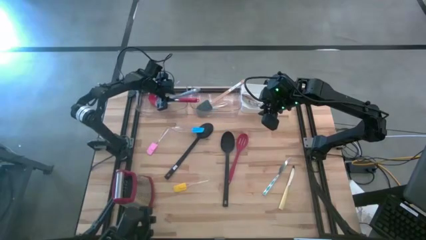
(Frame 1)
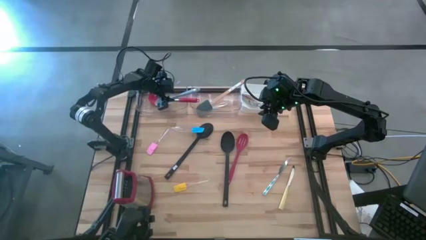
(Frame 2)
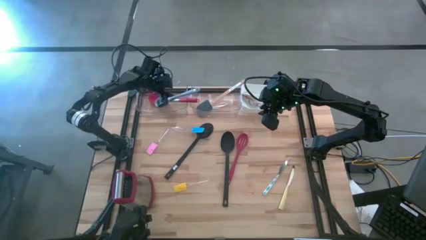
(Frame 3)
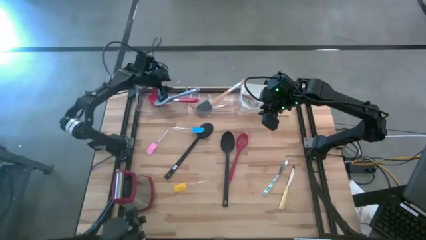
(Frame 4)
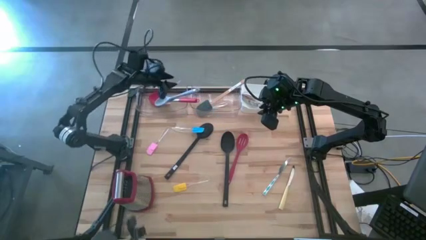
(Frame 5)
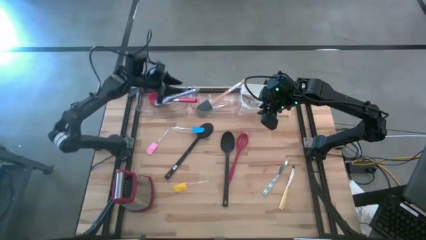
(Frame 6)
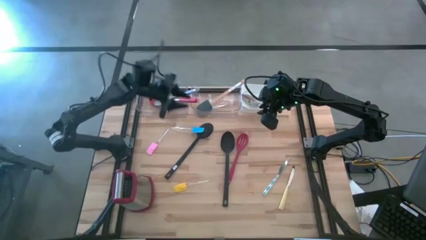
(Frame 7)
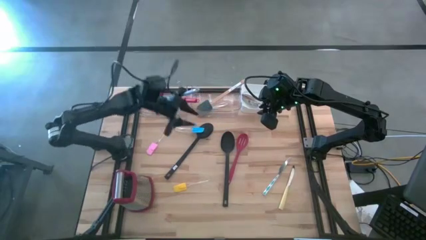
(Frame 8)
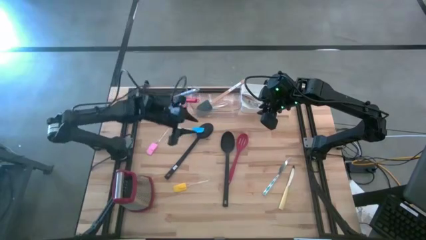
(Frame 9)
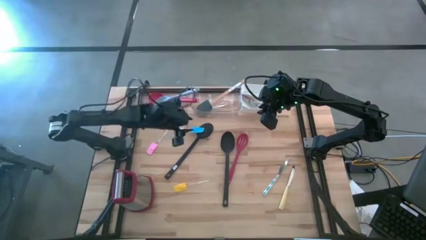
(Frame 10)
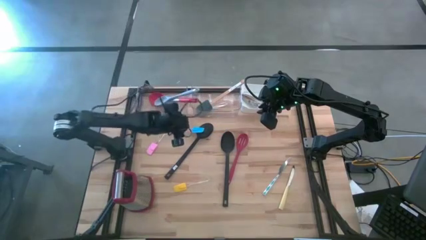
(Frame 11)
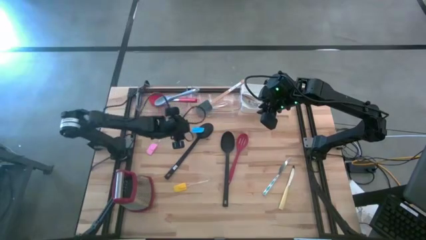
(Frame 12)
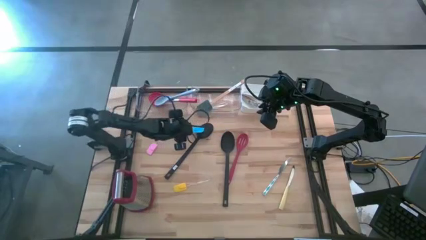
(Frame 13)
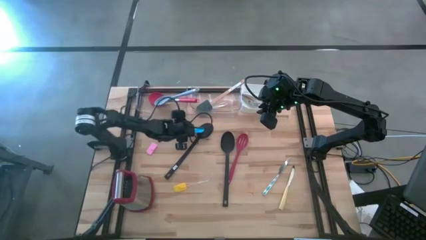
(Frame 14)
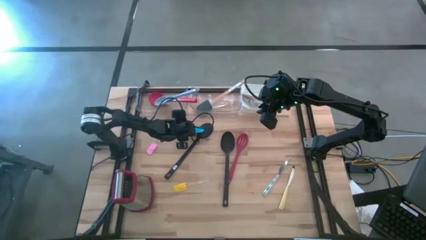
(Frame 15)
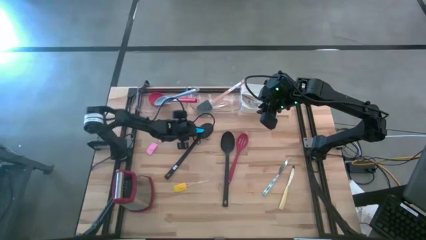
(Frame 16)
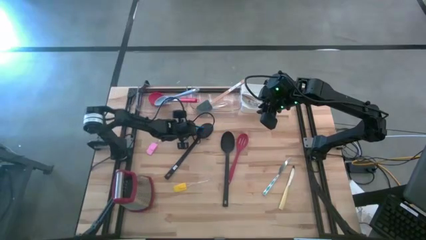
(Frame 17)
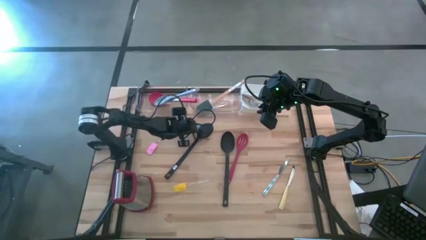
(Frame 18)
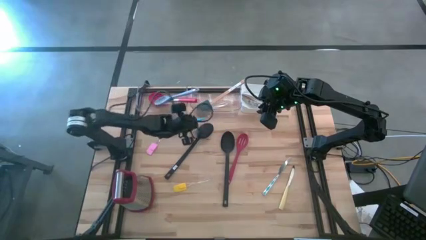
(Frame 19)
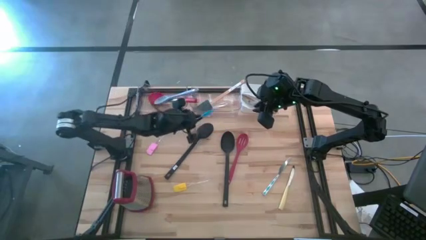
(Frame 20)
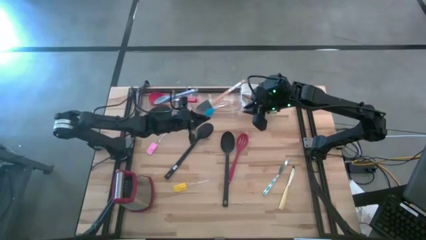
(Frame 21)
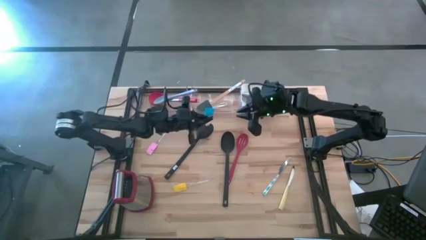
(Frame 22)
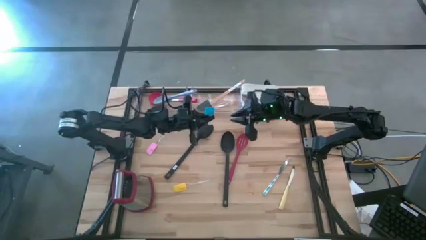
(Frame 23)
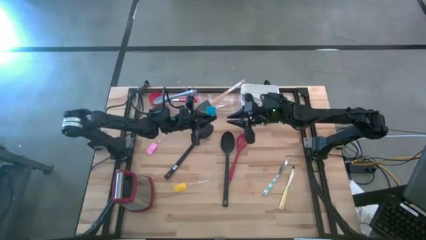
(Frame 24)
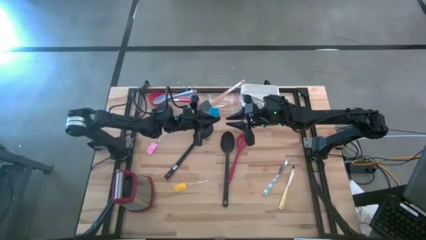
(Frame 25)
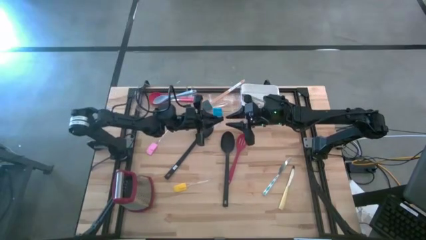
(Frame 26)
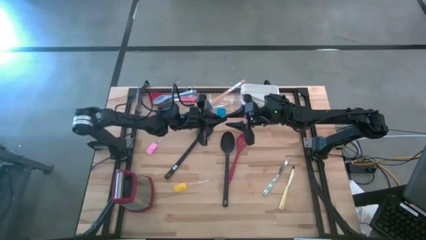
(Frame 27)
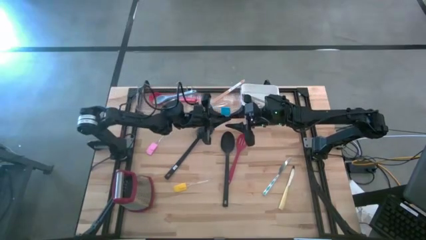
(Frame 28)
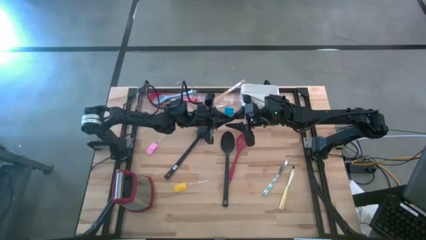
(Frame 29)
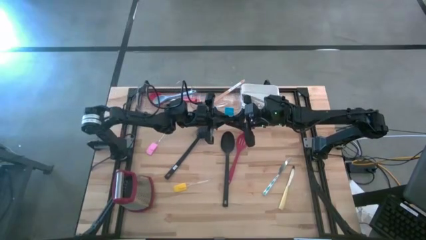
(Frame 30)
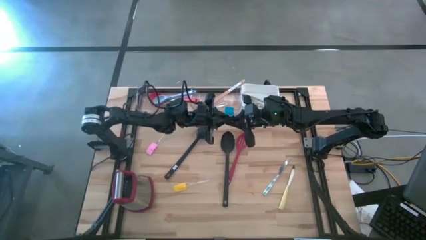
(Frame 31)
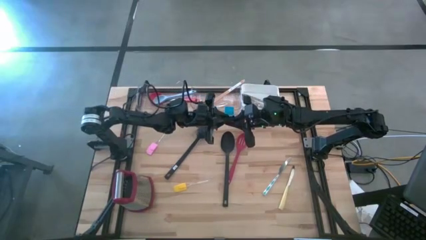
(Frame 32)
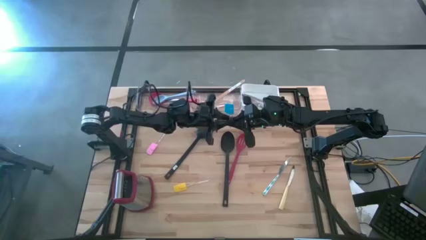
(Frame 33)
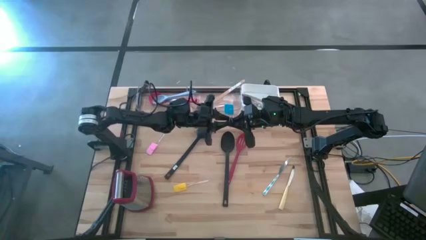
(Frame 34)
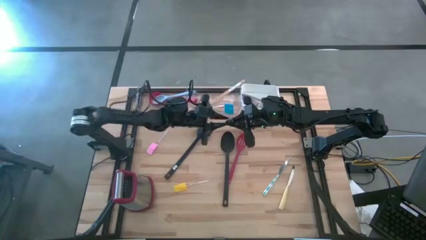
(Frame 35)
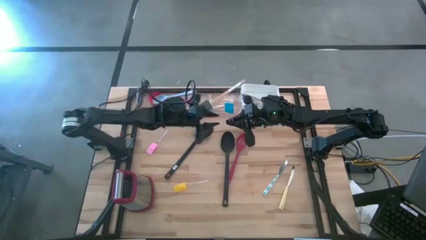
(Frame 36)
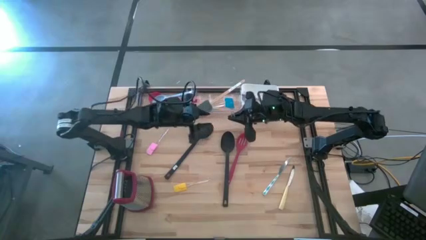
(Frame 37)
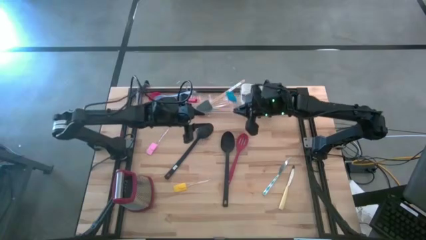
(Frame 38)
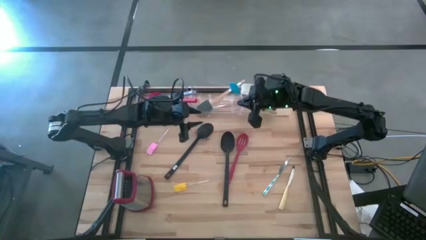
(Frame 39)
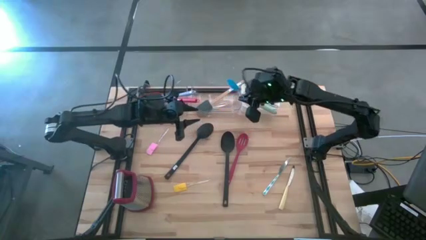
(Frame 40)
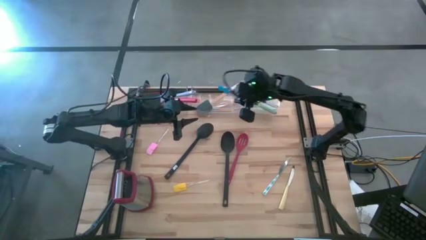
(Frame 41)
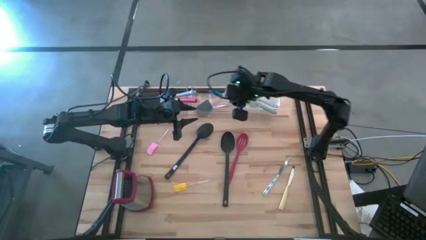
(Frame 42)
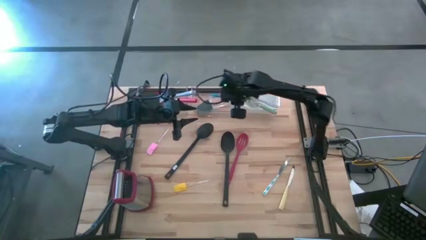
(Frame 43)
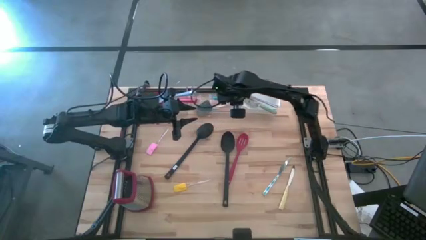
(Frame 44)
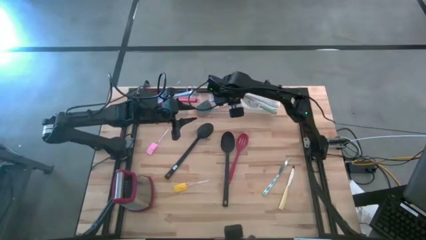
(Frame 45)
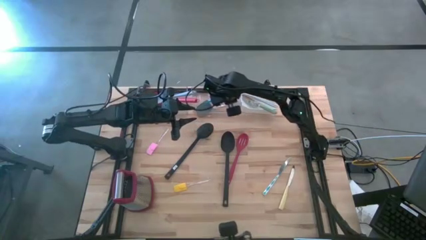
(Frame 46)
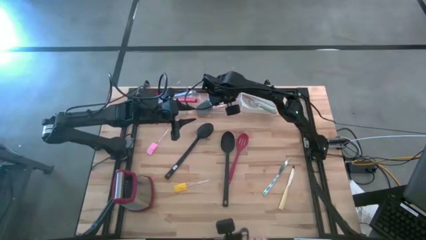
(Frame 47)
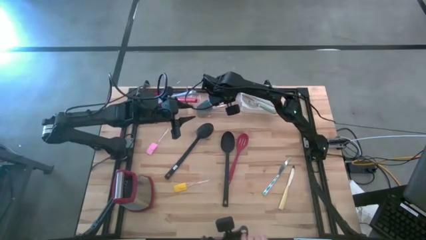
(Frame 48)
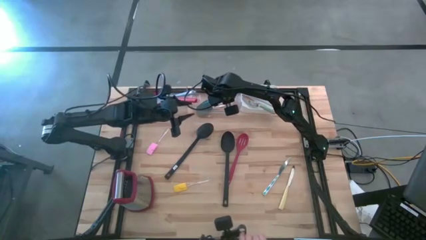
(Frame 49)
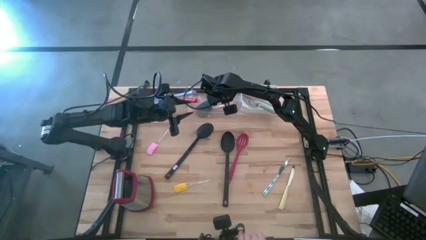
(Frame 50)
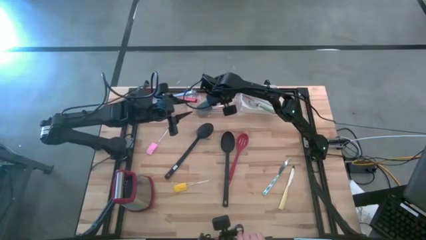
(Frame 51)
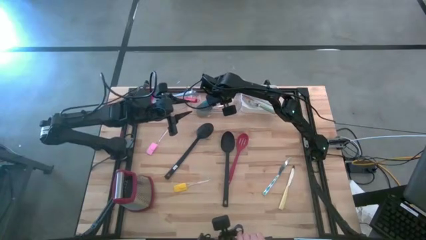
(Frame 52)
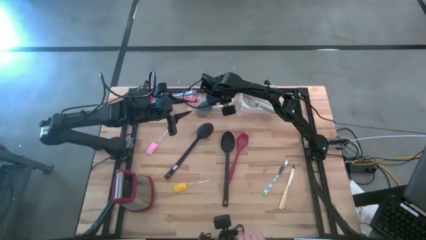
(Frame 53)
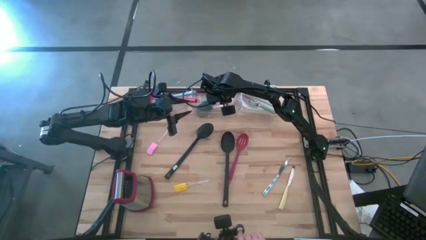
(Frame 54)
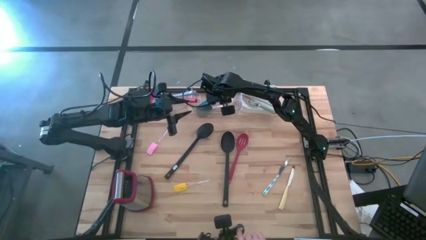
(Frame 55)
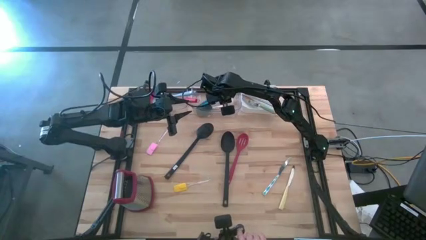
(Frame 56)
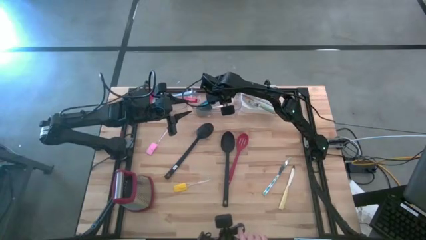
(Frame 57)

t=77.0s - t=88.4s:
Task: Pick & Place Kitchen Items
Put the blue spatula into the right transparent bin

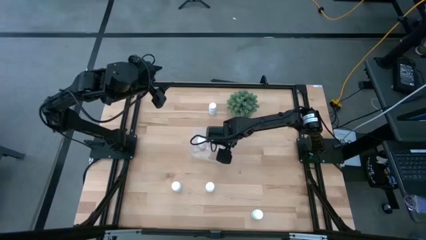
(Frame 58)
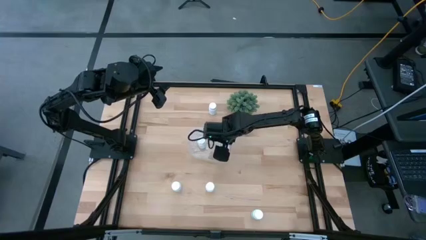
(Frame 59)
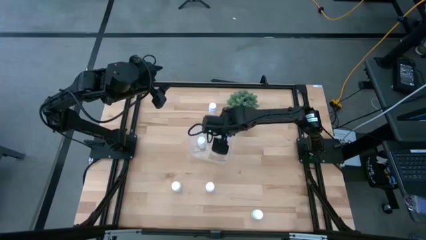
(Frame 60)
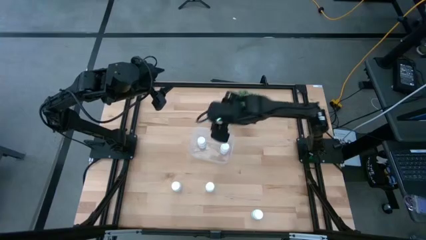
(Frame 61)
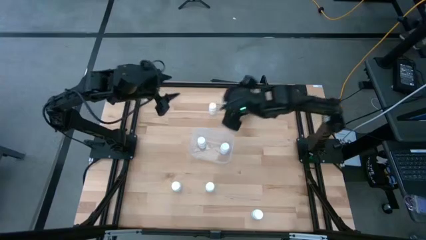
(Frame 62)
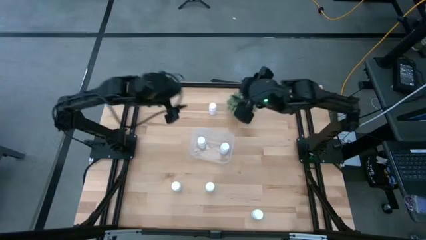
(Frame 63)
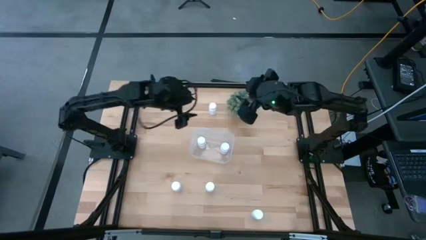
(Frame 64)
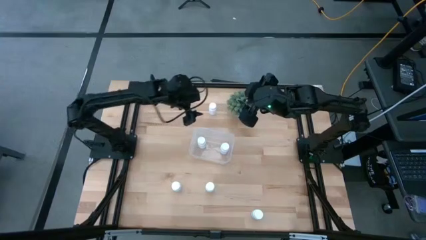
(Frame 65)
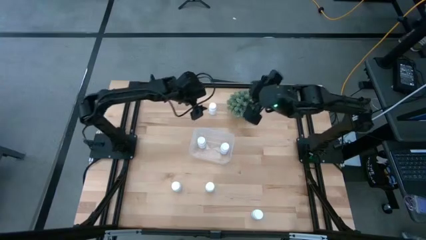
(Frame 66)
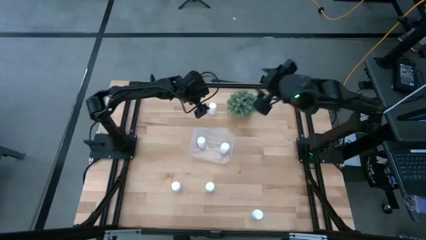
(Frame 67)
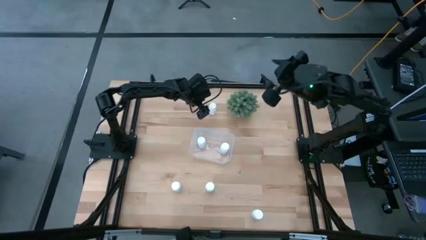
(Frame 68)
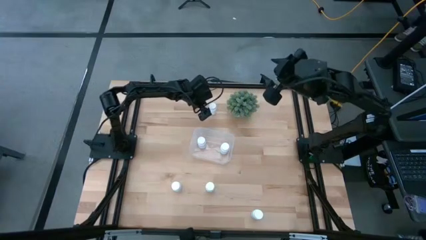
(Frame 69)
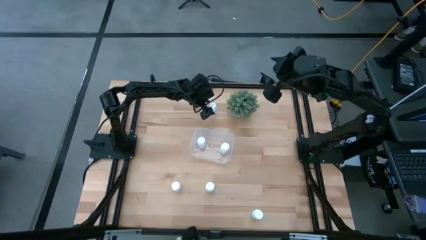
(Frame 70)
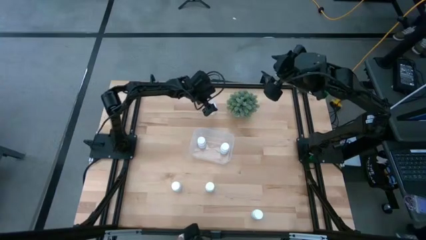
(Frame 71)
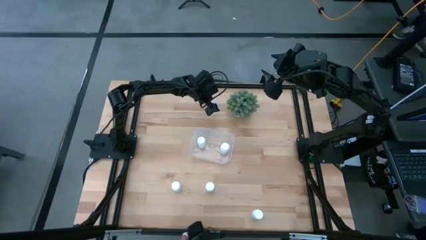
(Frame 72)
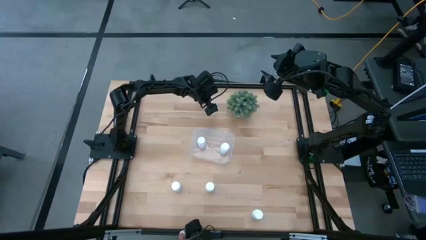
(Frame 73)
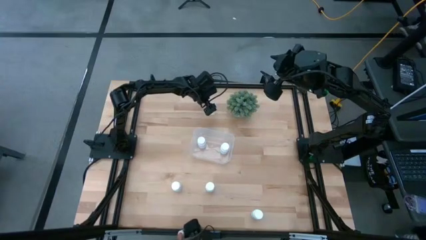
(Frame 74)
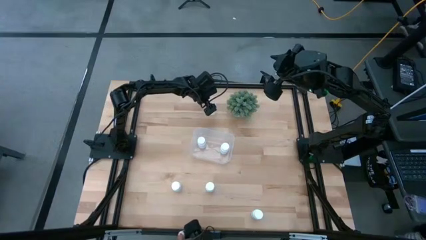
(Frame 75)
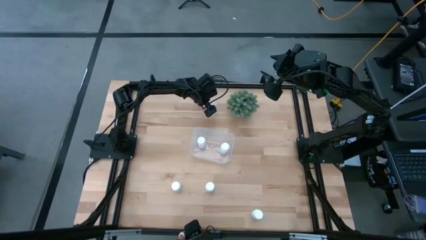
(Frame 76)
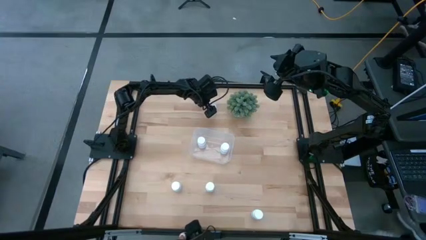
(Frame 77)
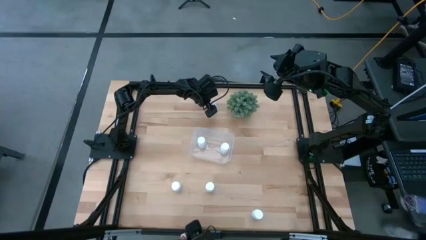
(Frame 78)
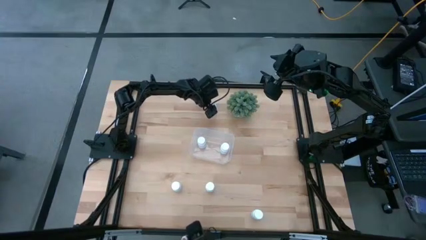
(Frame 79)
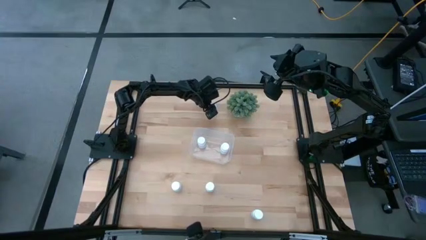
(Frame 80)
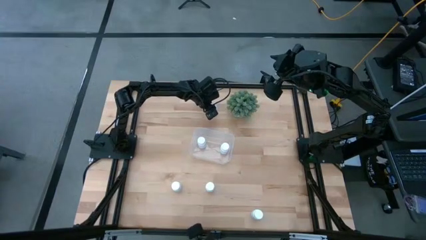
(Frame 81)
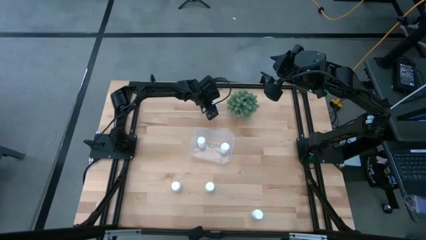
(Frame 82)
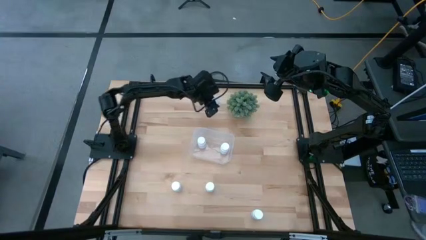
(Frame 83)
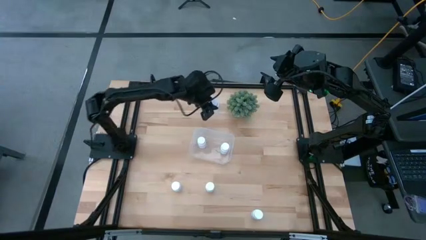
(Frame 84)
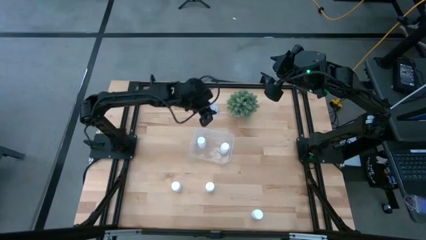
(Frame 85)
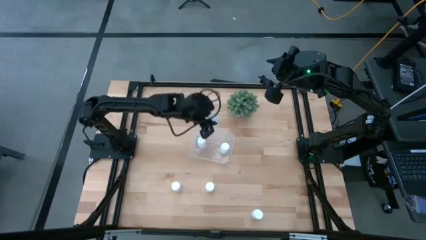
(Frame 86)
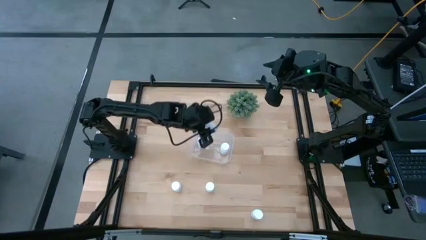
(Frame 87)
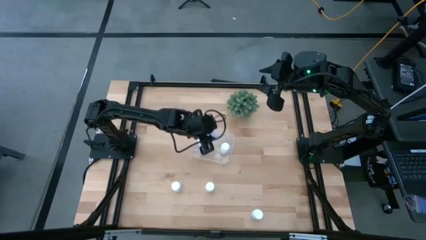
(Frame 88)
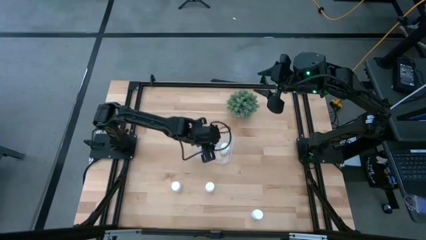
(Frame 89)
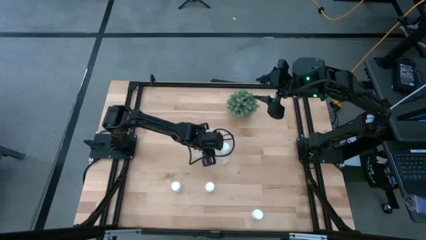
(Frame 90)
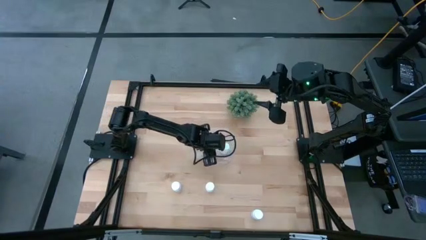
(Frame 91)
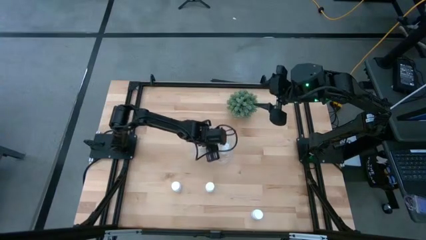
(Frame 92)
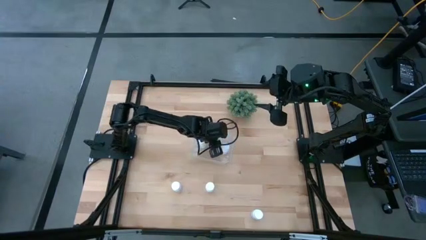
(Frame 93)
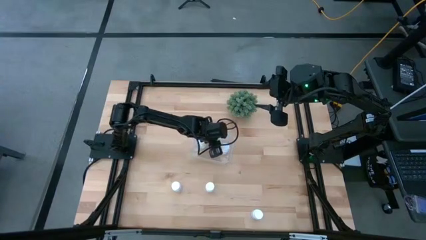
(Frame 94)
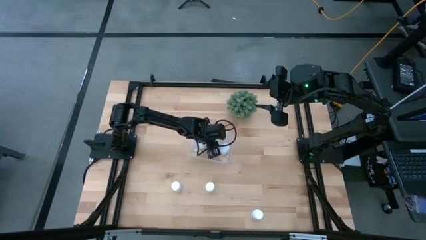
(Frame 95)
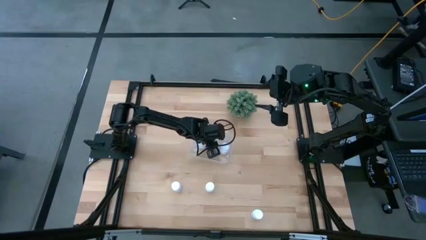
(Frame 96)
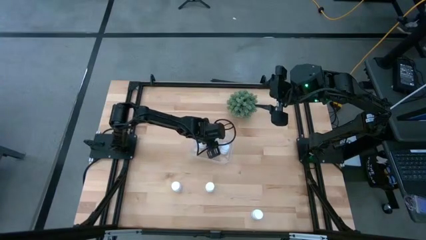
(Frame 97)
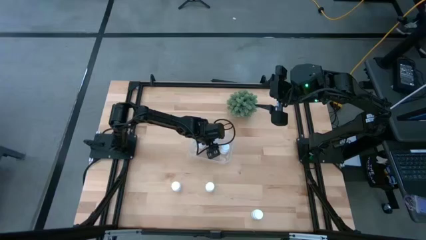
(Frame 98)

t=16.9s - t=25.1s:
Task: Pick and place pill bottles into a basket
Put the white pill bottle into the transparent bin
